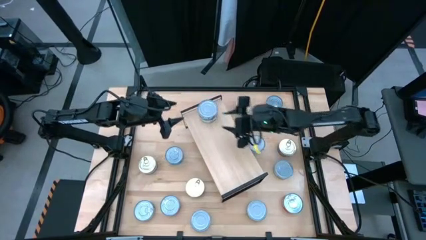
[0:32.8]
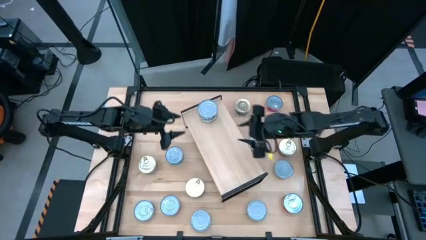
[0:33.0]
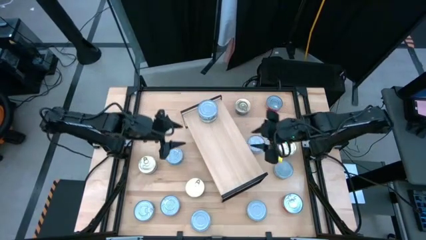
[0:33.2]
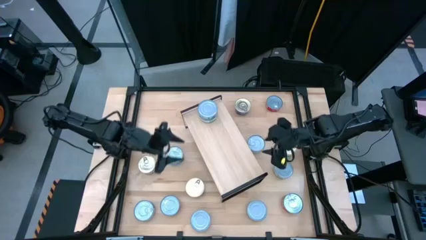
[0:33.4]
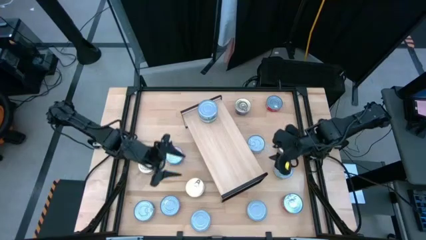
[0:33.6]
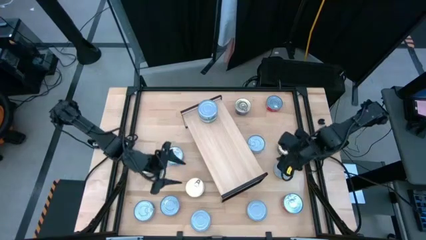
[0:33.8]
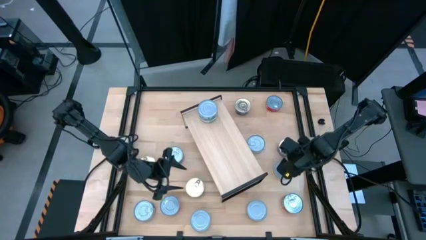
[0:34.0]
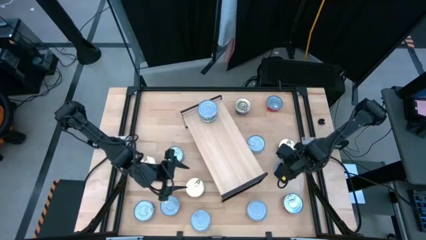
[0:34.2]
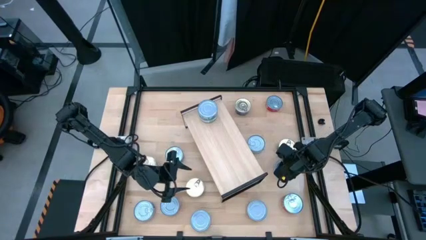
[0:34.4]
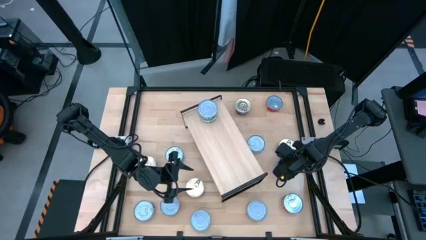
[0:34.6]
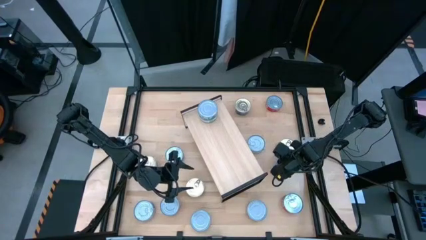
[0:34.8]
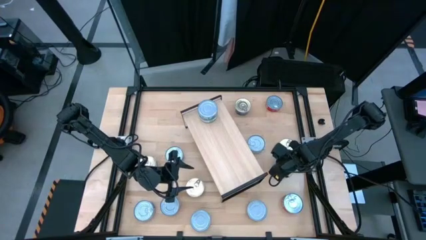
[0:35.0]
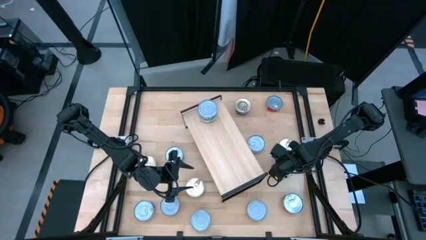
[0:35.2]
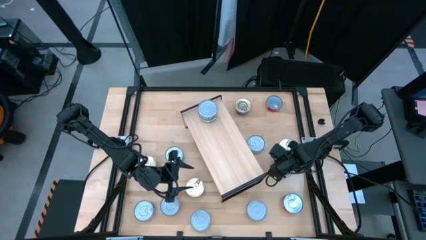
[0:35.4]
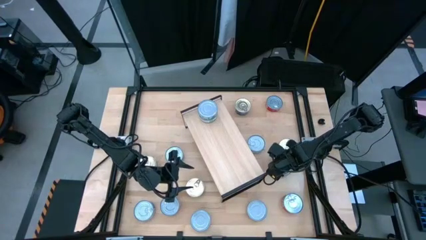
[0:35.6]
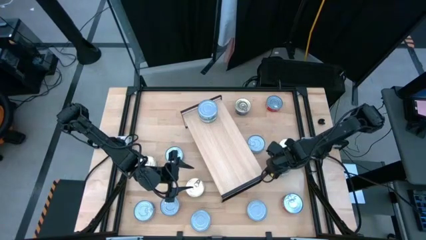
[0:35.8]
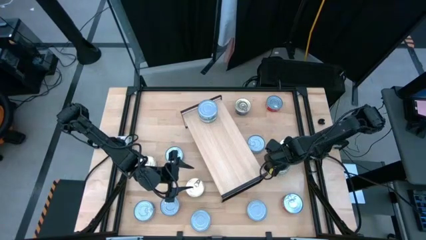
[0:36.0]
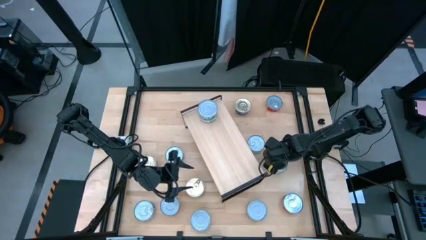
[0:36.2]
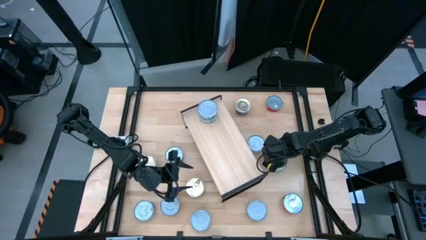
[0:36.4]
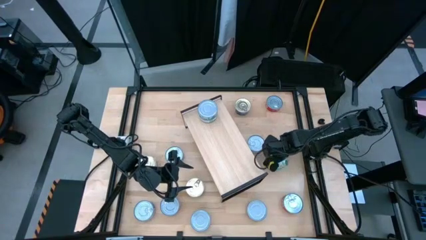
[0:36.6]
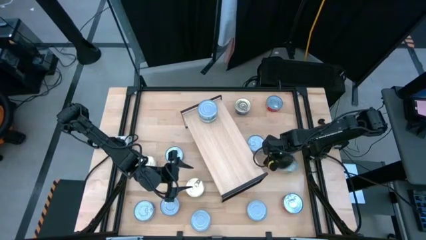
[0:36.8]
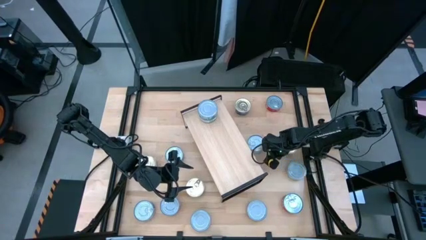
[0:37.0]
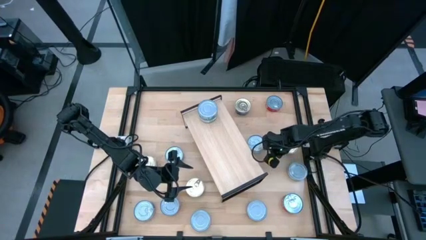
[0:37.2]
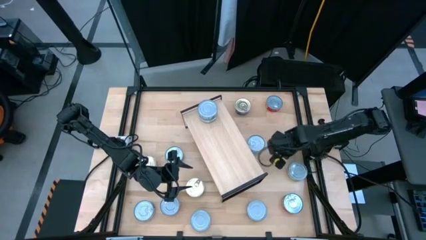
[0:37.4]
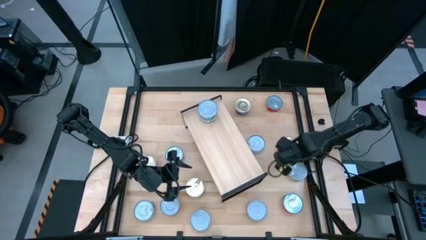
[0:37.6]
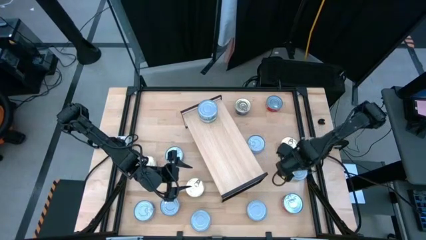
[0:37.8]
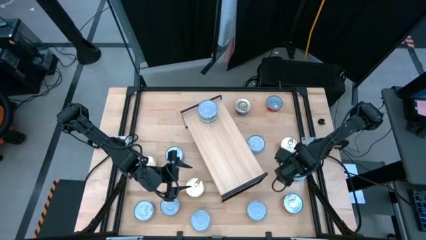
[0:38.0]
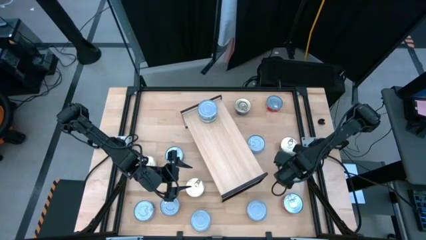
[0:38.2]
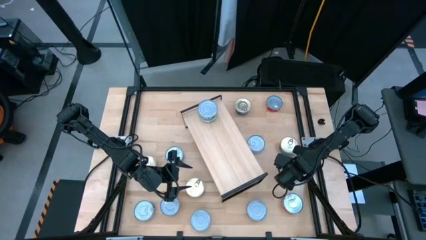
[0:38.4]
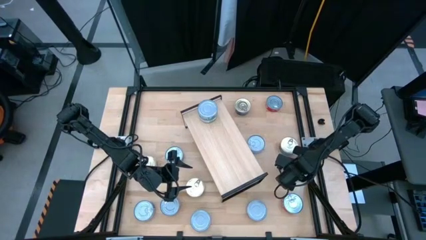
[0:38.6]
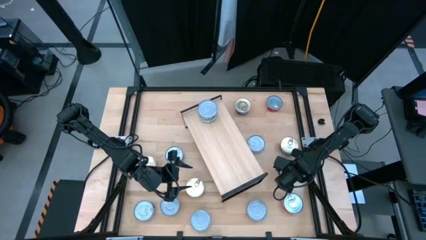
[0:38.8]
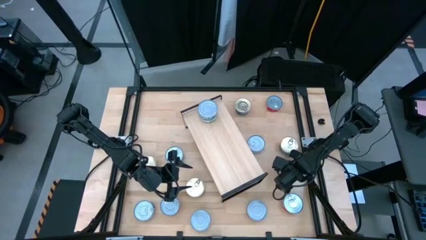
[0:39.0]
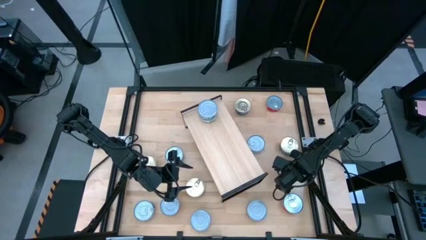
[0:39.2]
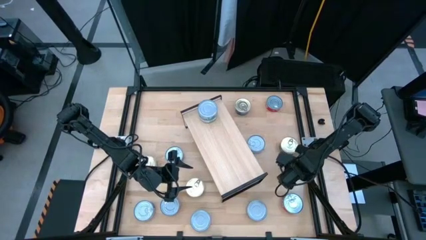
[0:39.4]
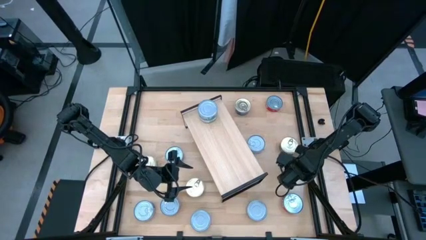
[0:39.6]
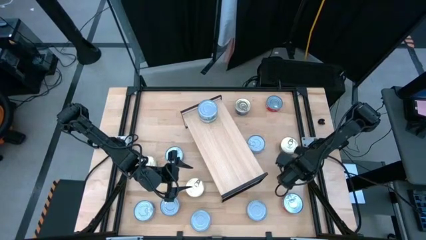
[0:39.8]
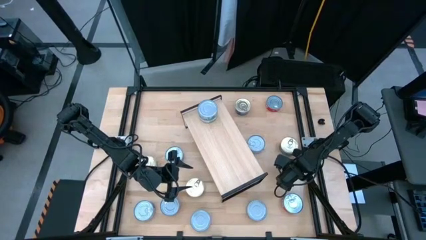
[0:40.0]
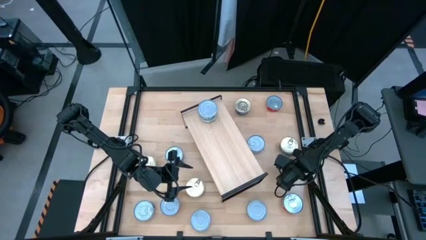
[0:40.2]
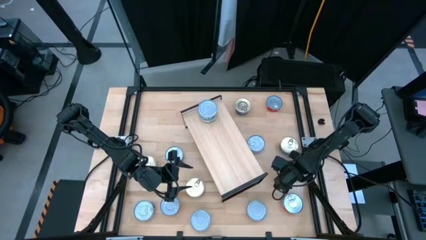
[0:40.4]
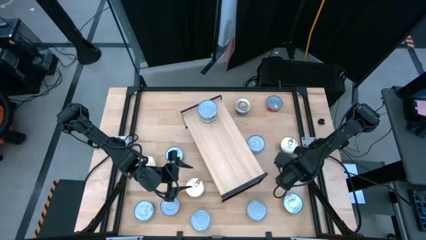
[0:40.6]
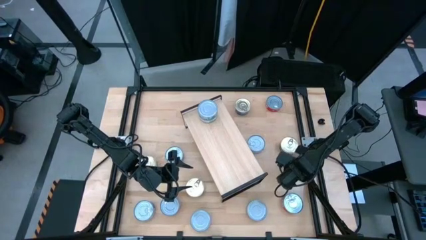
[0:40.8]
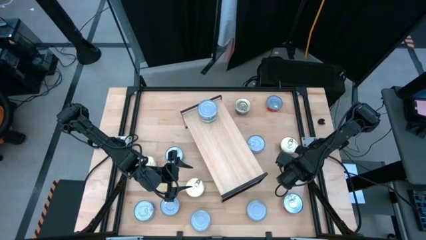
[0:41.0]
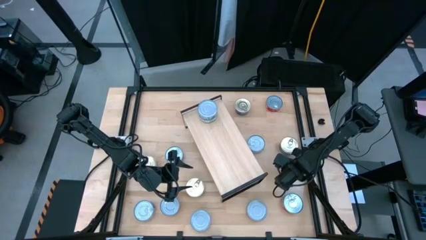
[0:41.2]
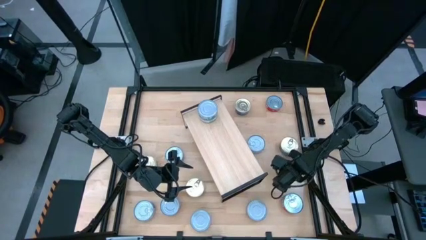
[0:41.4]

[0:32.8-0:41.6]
Task: Stack canned seafood by type on shelf
Stack the green tuna can on top of the other tuna can on the shelf
